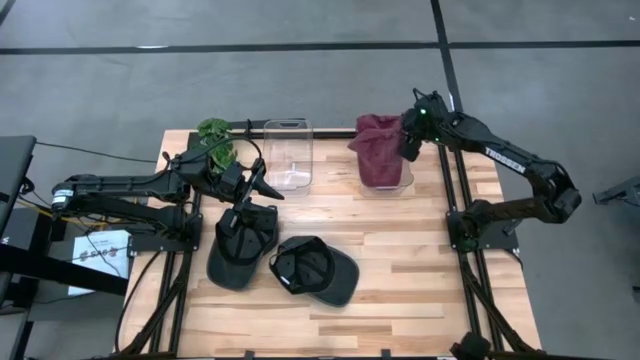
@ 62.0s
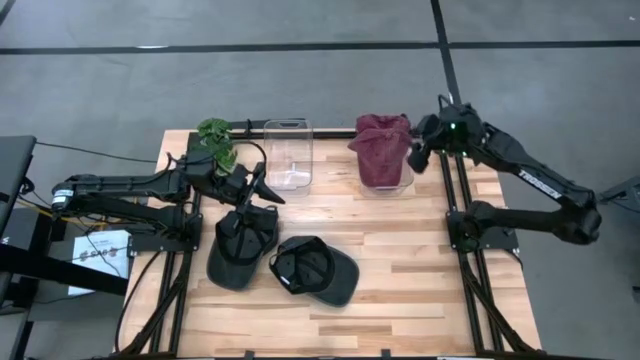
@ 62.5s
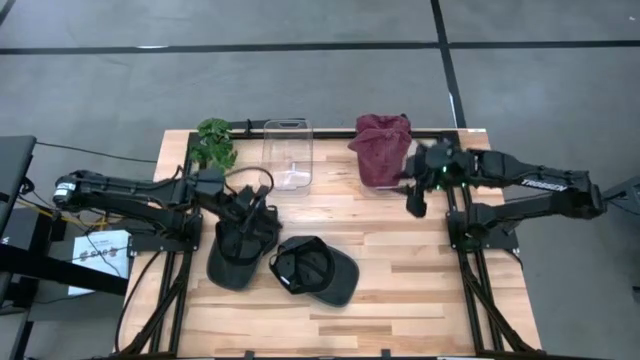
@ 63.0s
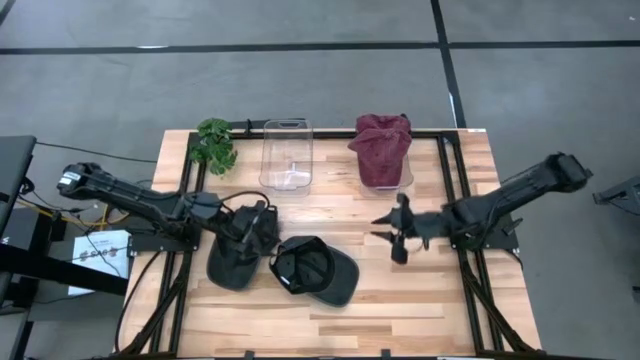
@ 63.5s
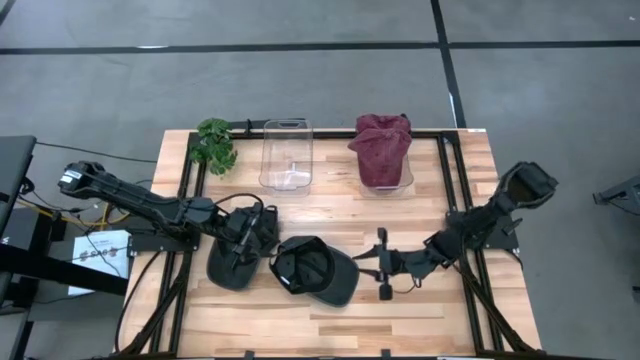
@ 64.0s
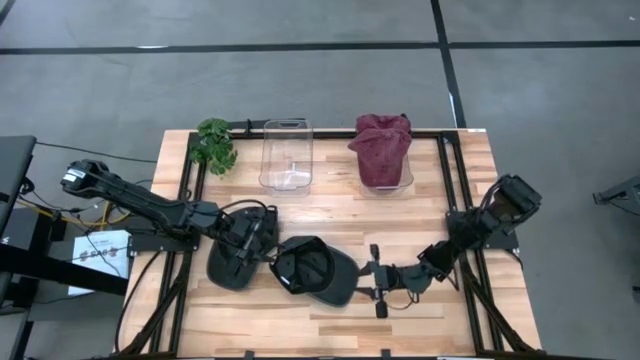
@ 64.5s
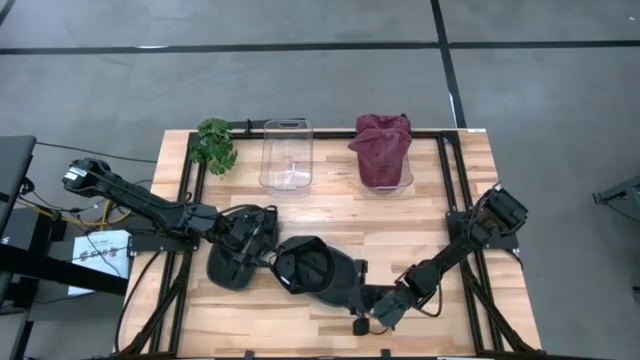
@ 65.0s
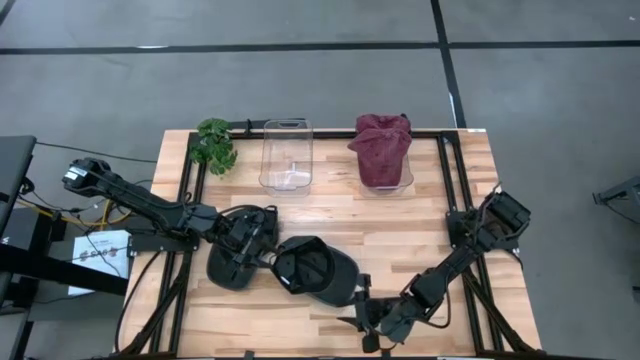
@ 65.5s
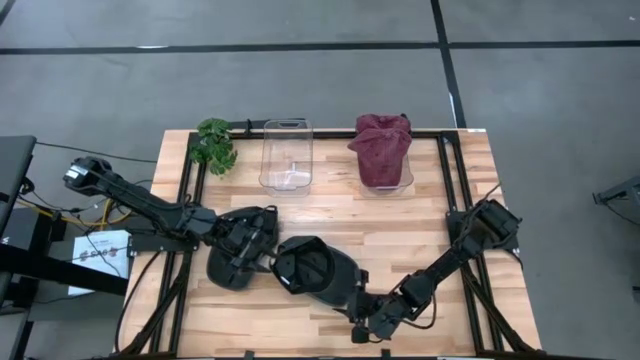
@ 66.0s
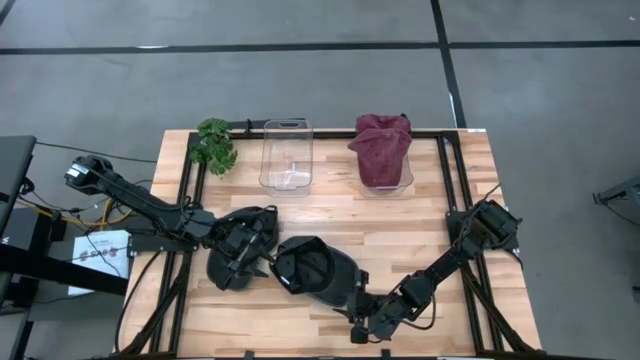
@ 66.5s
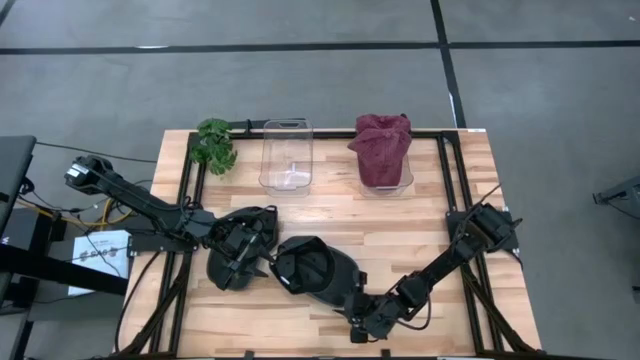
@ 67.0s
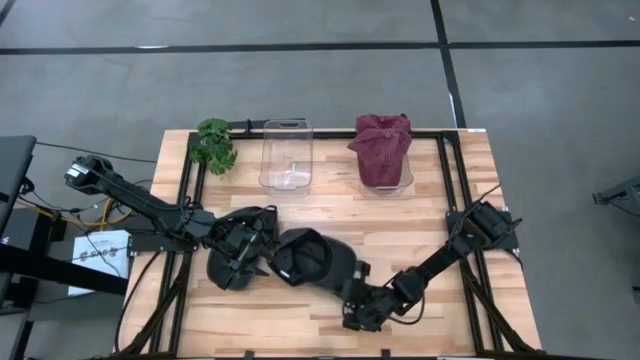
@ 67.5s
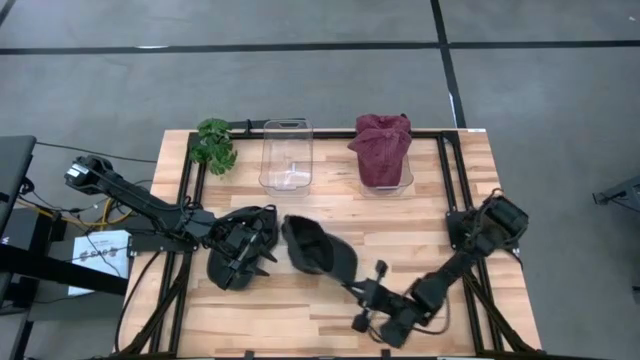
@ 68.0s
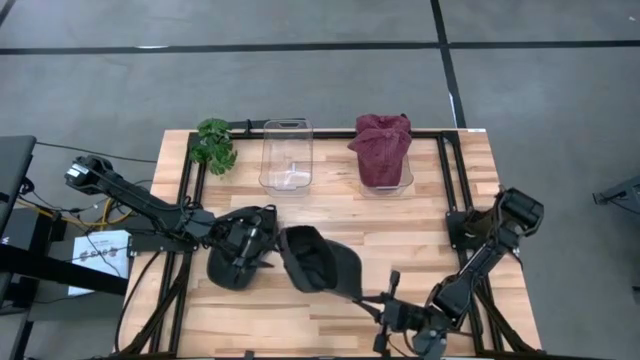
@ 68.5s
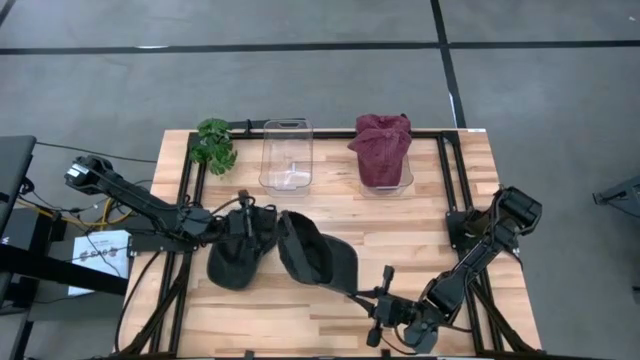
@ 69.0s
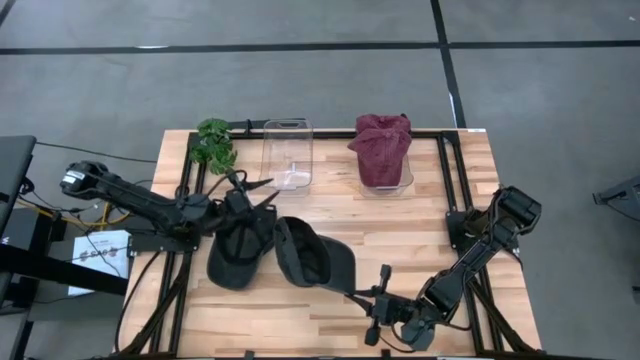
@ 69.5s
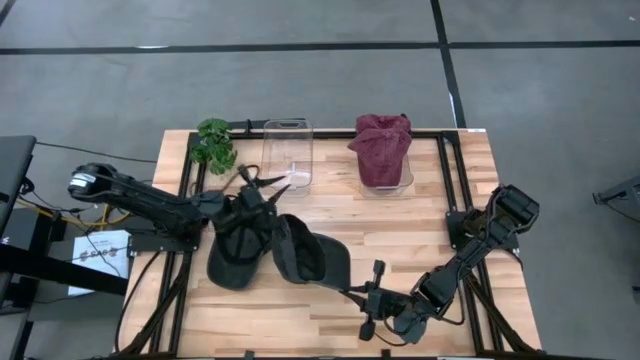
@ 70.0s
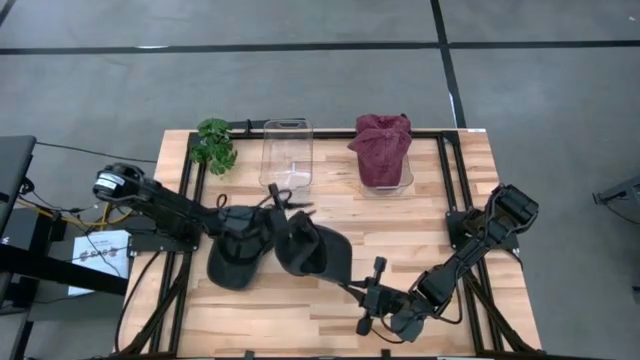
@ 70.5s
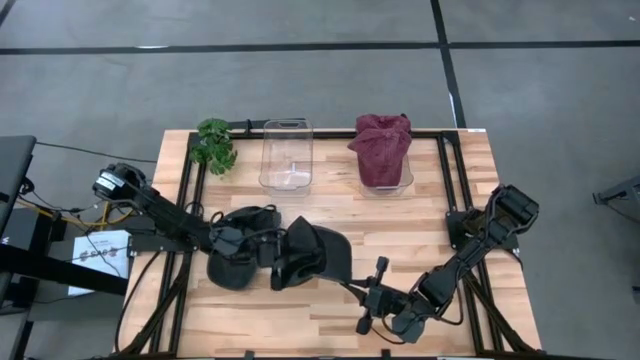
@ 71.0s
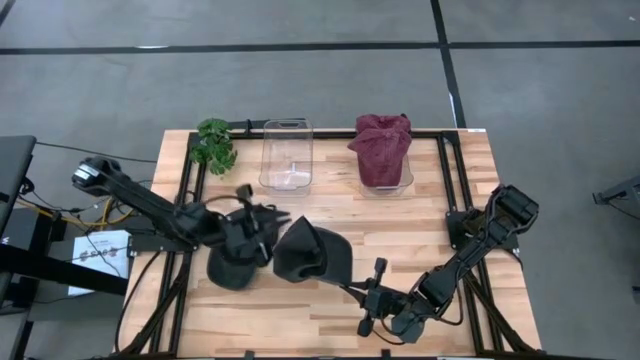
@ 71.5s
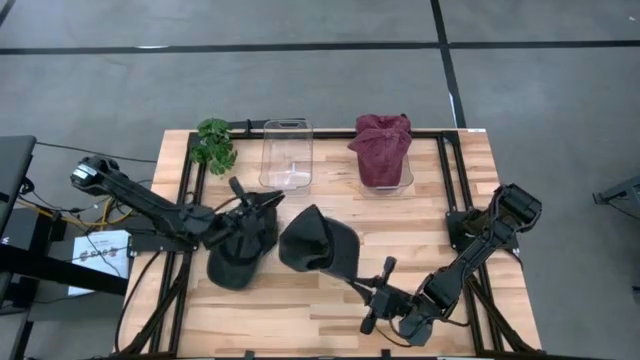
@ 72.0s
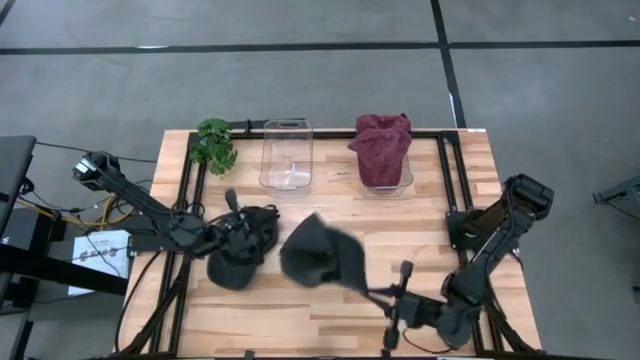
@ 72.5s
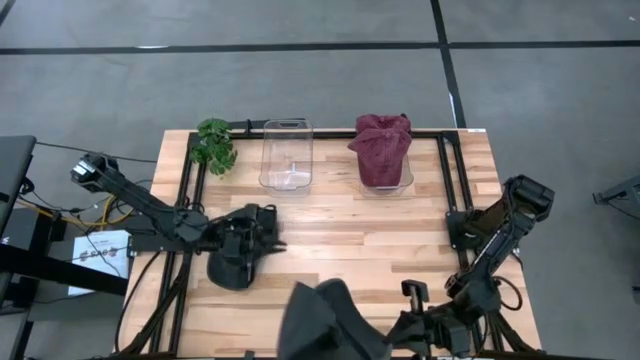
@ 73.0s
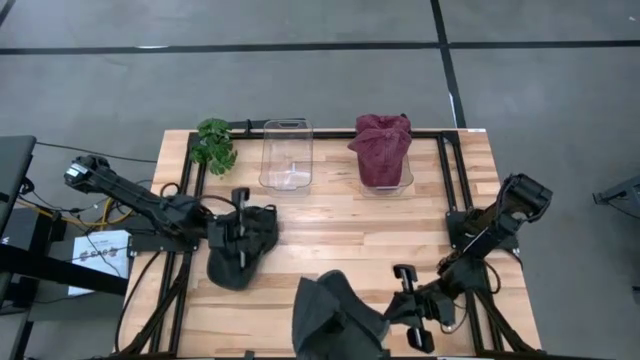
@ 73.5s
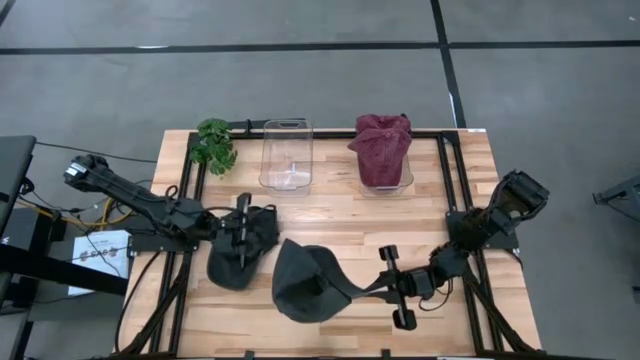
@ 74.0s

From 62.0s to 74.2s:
Task: Pick & Place hat
Put the right black cap into the left transparent bin

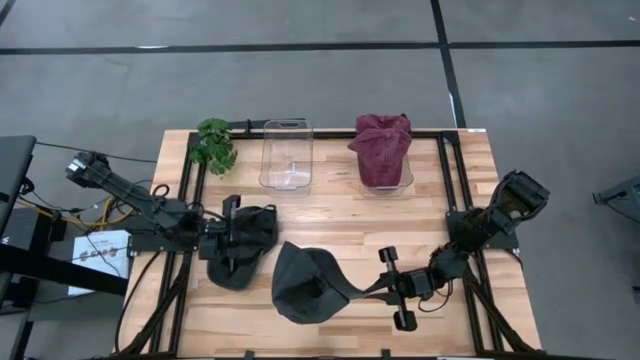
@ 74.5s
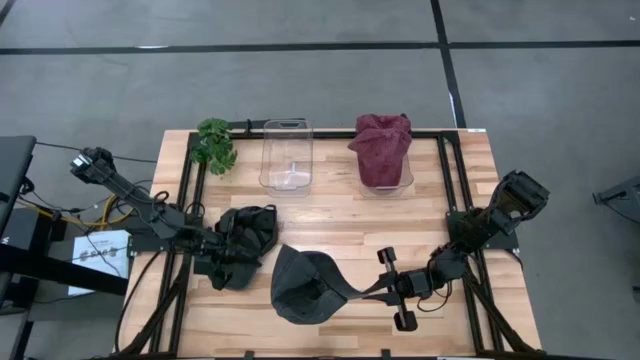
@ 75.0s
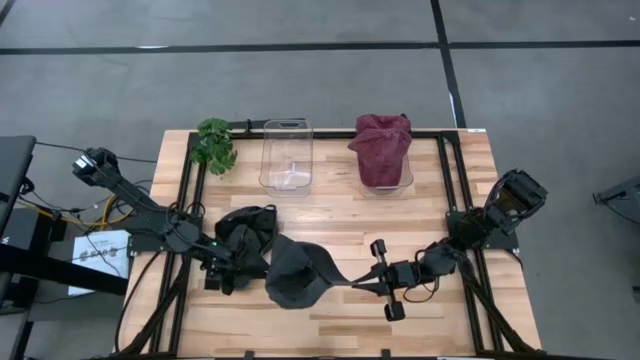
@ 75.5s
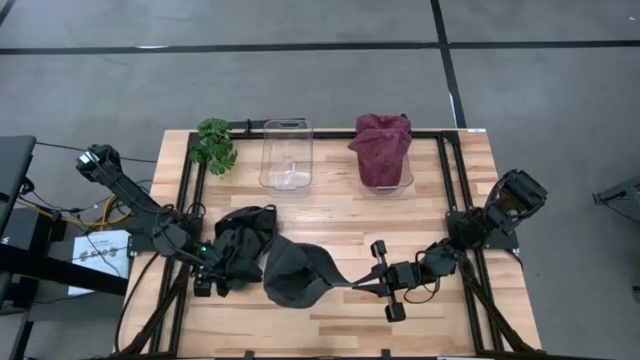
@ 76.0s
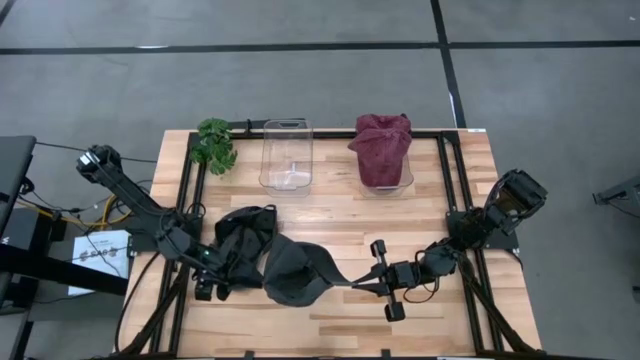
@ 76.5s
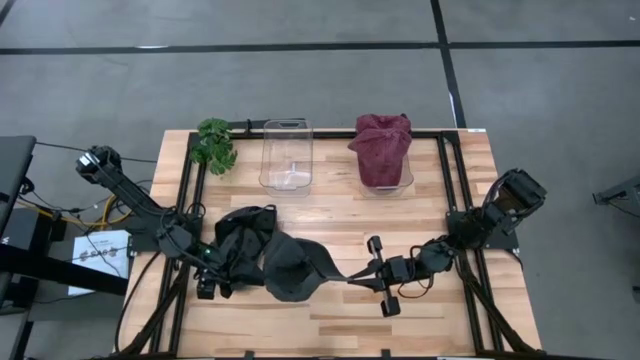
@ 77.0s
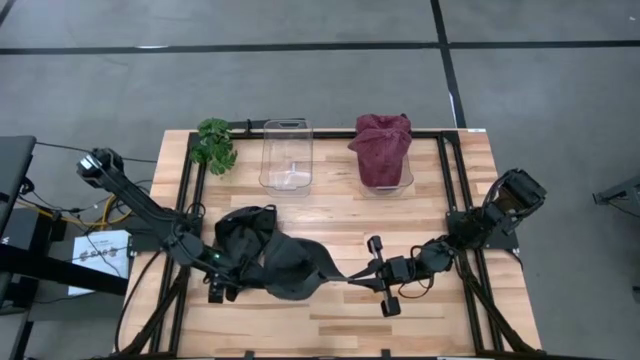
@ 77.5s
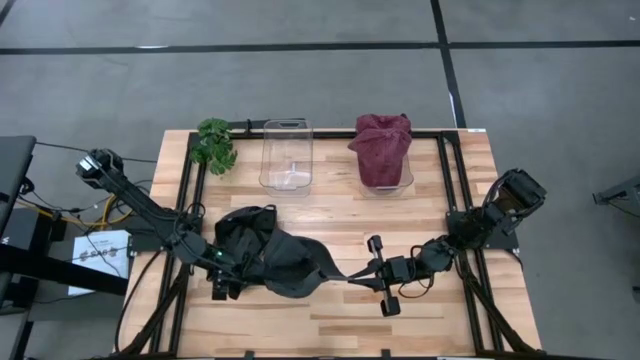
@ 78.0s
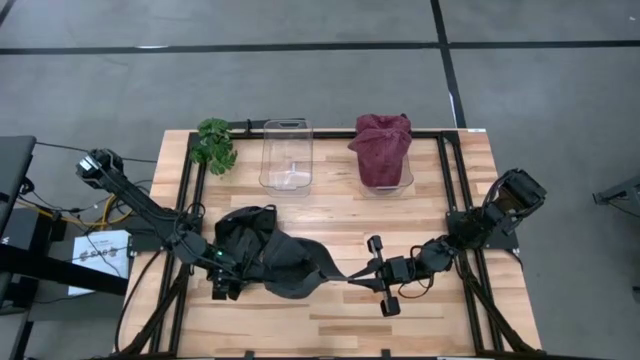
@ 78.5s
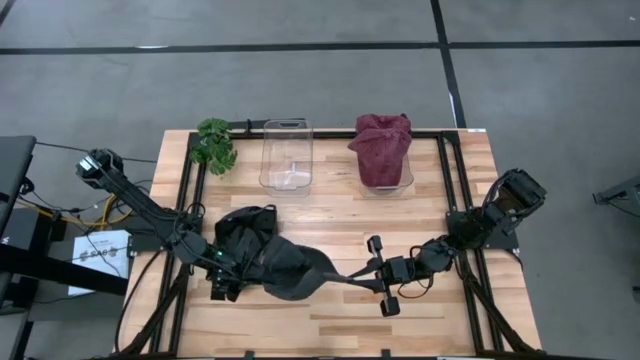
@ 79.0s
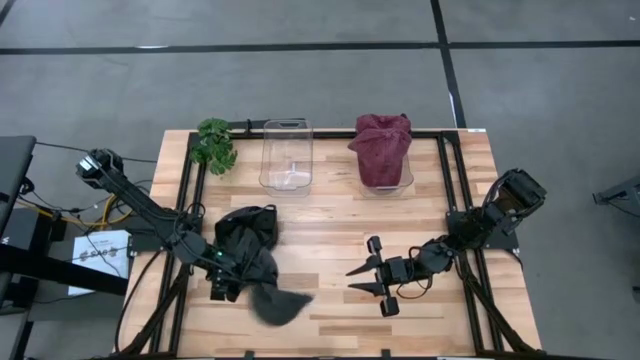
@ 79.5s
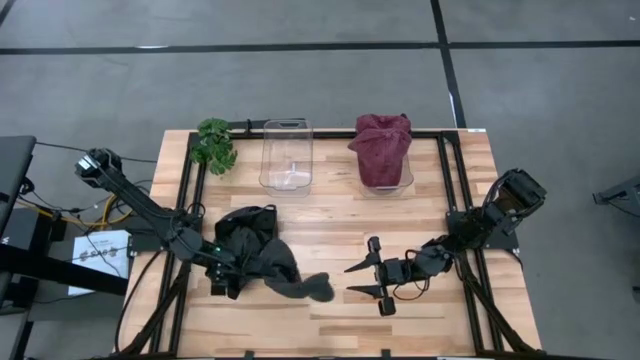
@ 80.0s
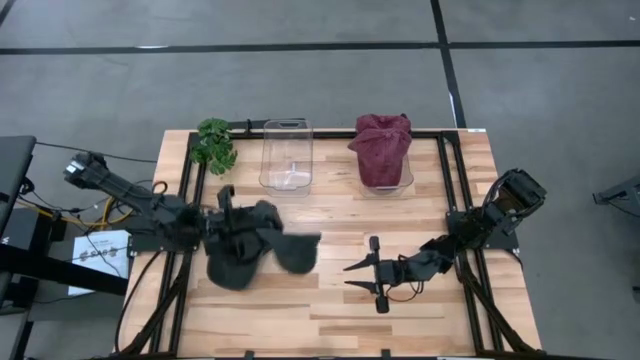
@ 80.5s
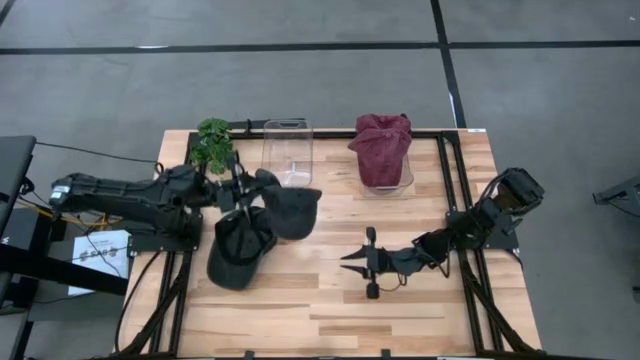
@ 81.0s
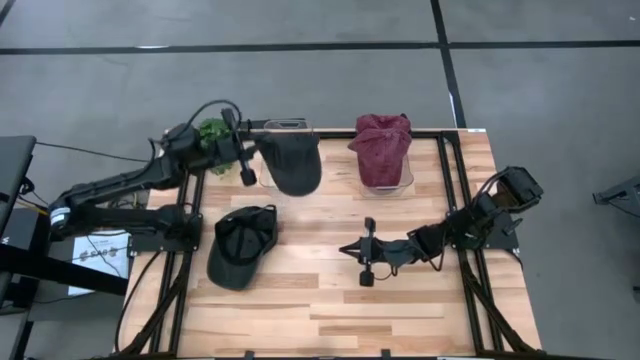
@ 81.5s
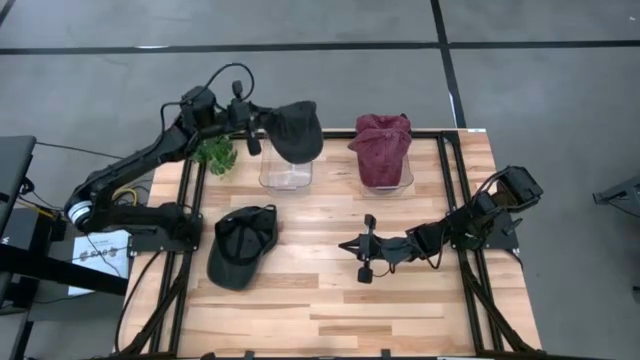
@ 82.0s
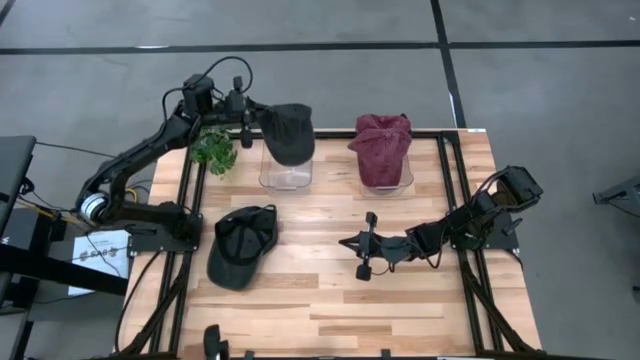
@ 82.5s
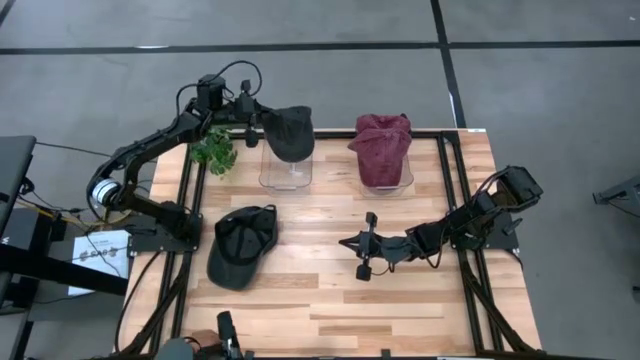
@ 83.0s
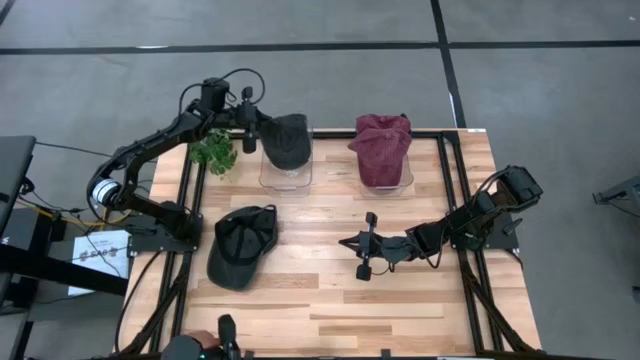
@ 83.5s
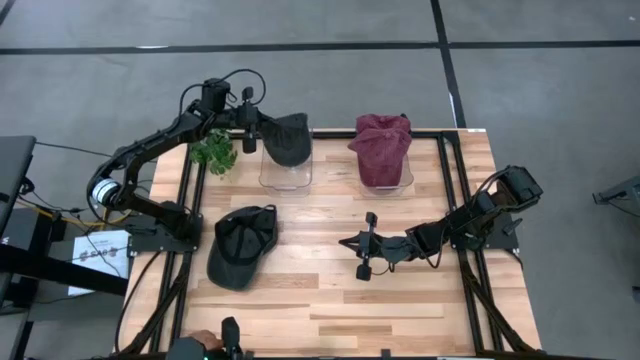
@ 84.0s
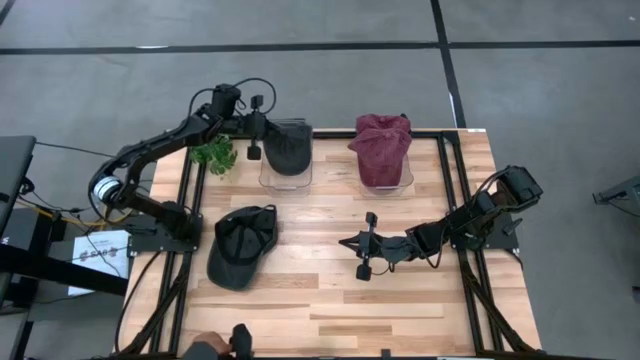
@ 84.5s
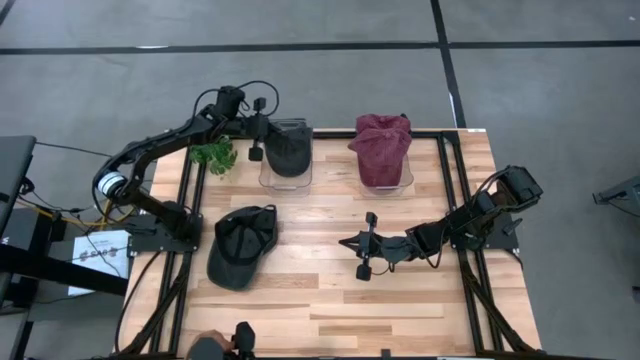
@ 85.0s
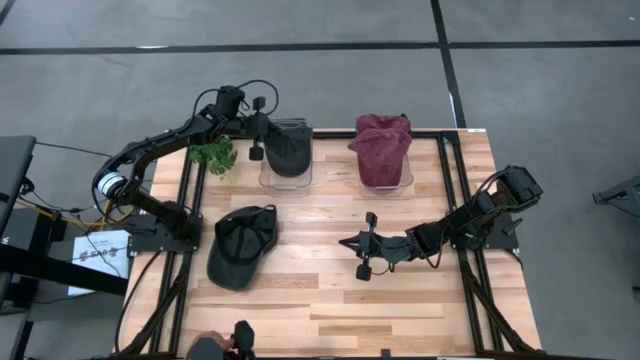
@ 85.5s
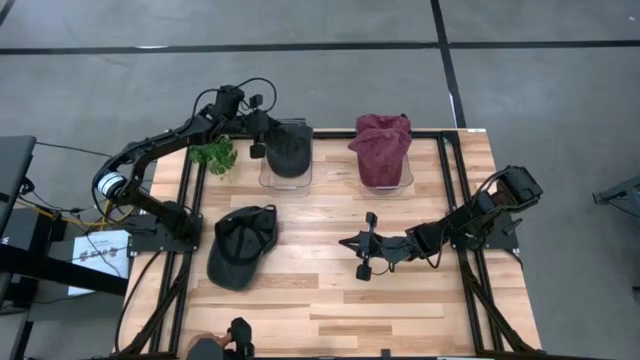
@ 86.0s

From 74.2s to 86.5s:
Put the right black cap into the left transparent bin
